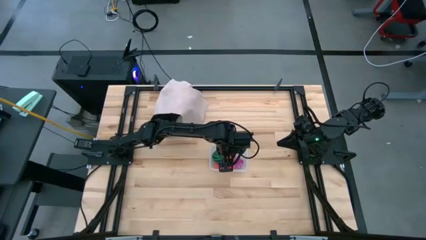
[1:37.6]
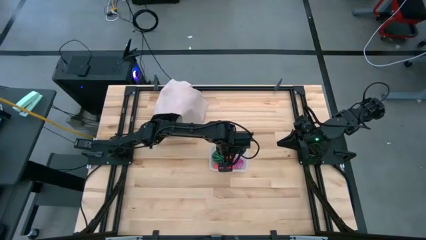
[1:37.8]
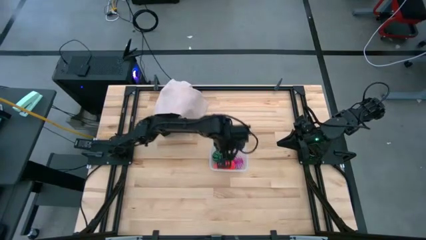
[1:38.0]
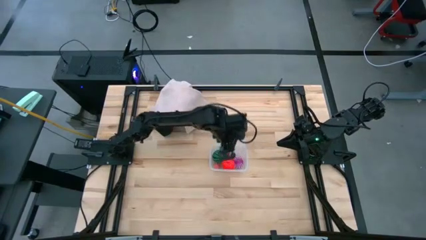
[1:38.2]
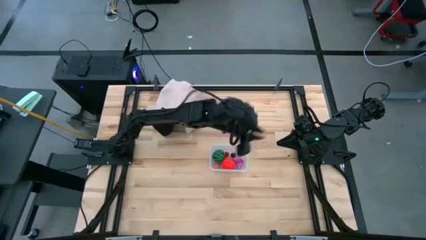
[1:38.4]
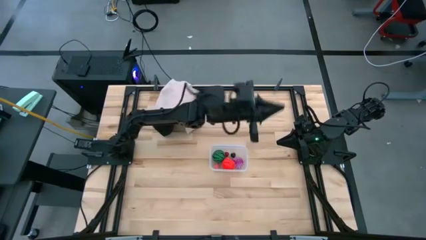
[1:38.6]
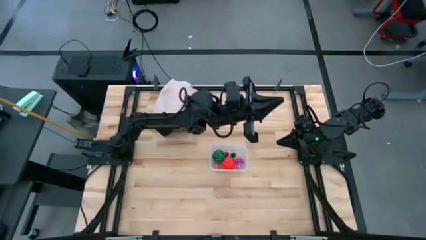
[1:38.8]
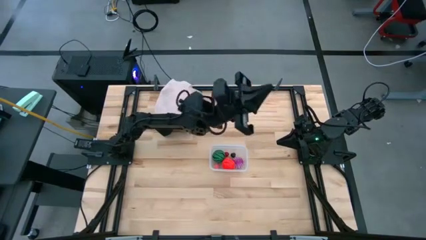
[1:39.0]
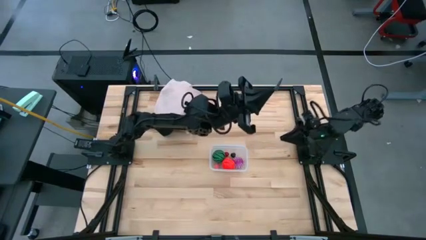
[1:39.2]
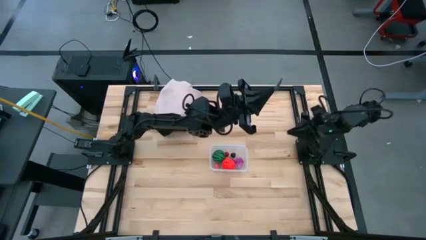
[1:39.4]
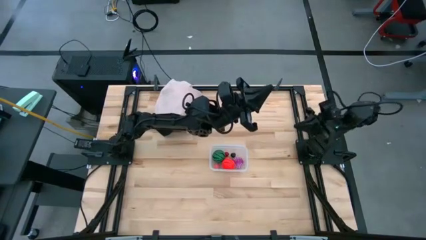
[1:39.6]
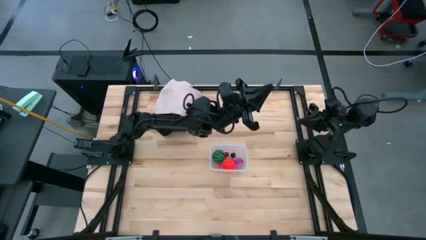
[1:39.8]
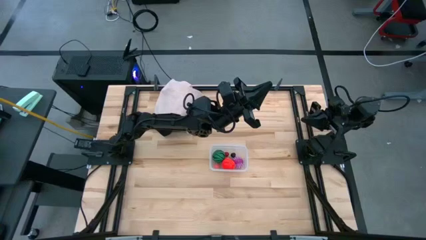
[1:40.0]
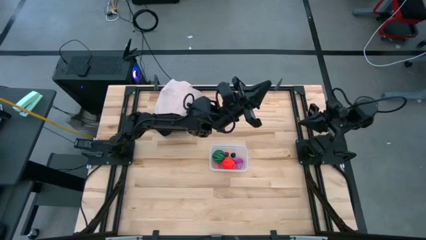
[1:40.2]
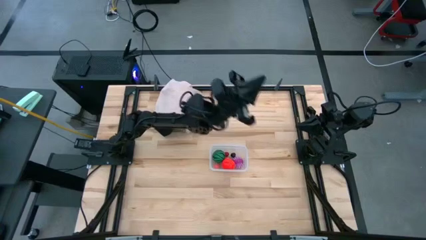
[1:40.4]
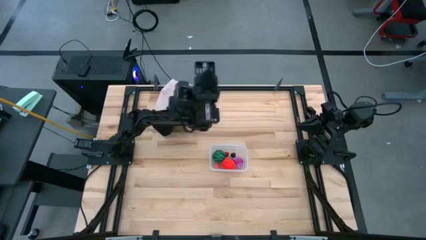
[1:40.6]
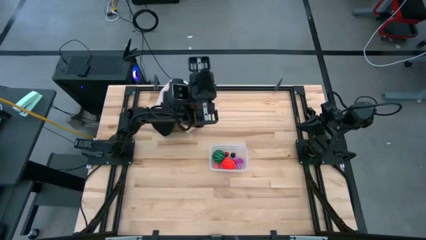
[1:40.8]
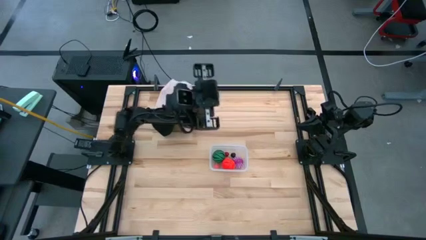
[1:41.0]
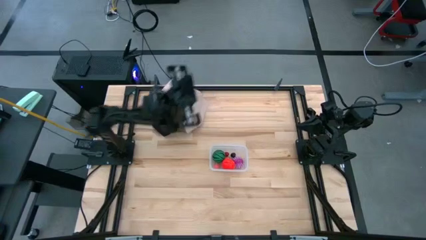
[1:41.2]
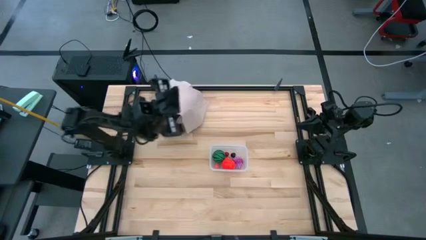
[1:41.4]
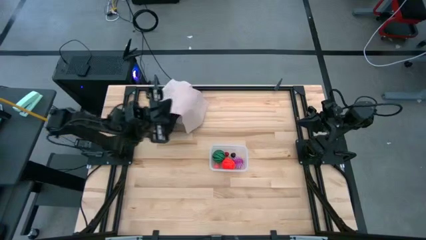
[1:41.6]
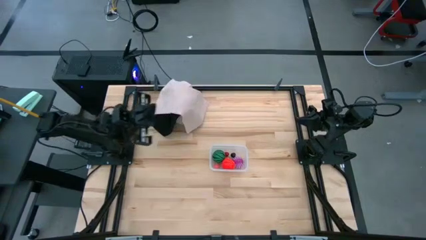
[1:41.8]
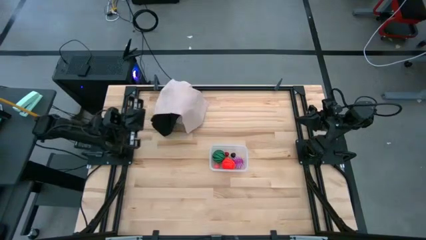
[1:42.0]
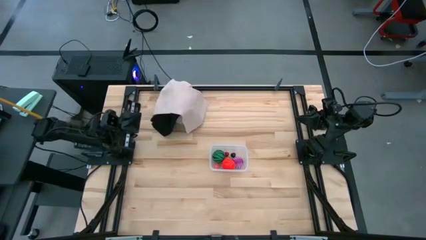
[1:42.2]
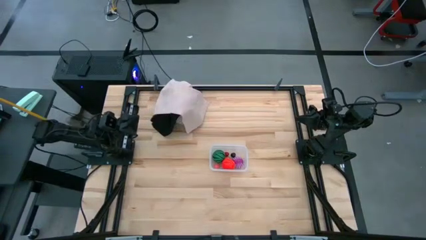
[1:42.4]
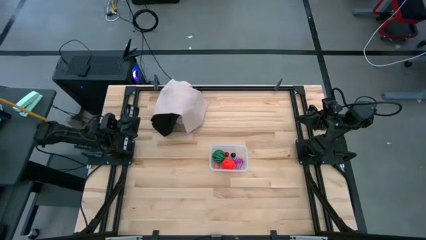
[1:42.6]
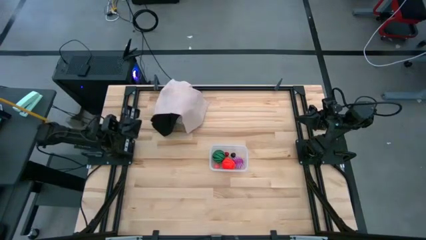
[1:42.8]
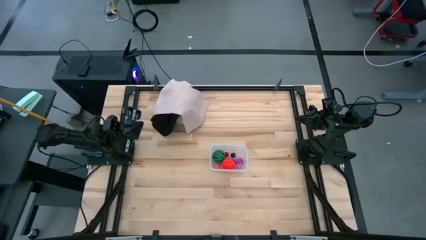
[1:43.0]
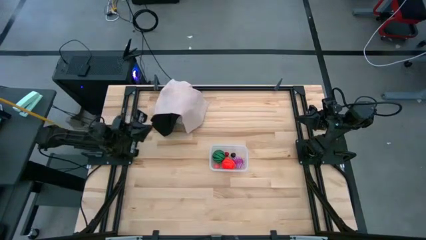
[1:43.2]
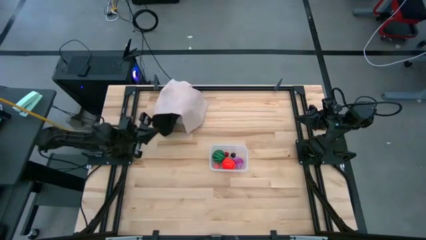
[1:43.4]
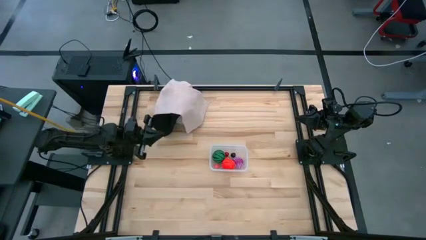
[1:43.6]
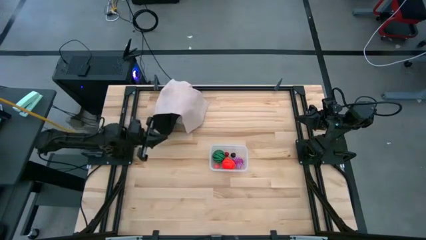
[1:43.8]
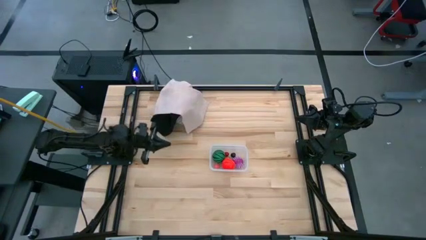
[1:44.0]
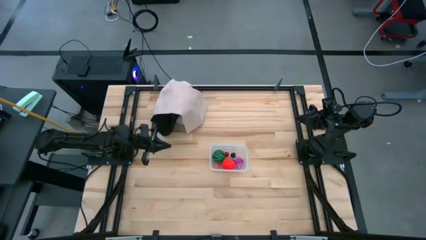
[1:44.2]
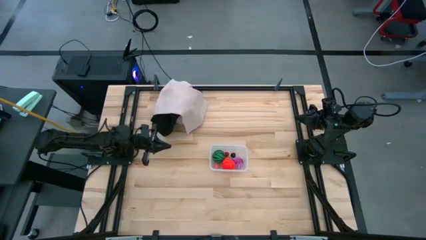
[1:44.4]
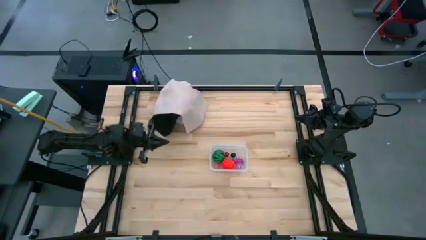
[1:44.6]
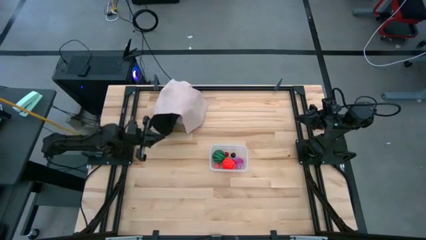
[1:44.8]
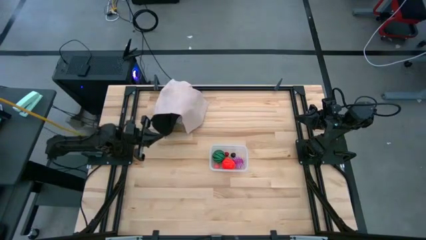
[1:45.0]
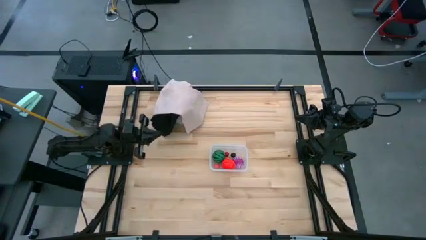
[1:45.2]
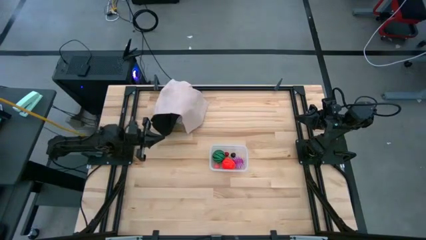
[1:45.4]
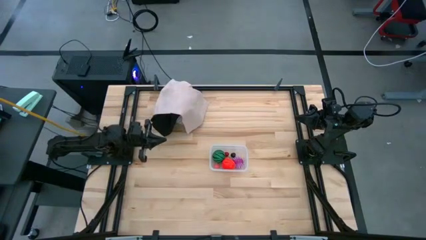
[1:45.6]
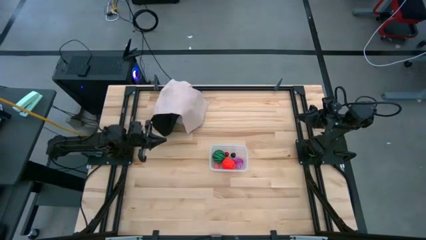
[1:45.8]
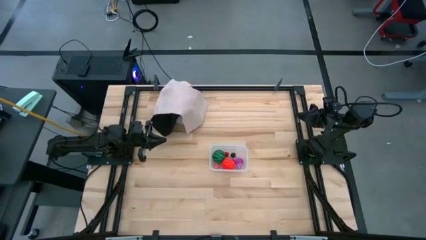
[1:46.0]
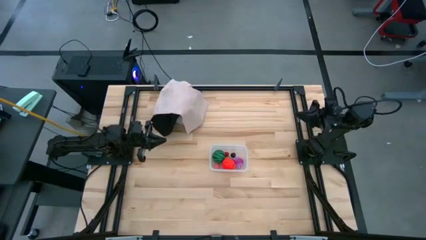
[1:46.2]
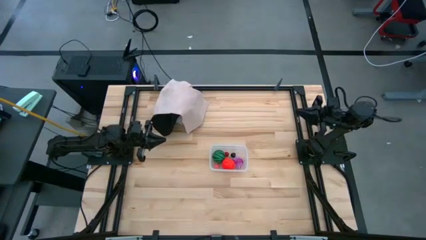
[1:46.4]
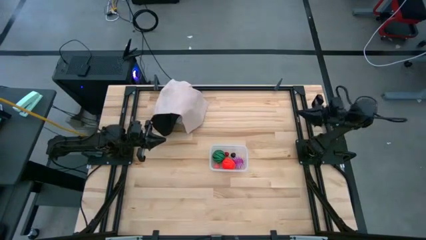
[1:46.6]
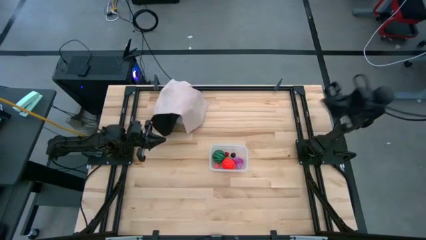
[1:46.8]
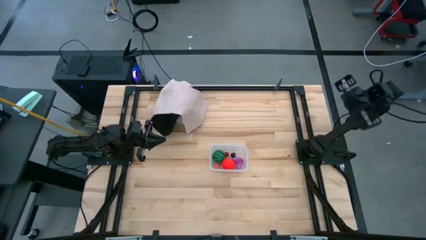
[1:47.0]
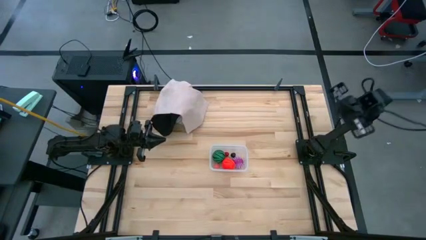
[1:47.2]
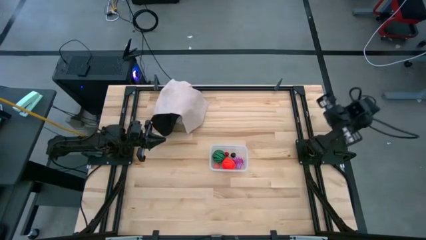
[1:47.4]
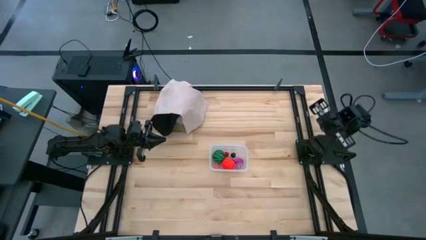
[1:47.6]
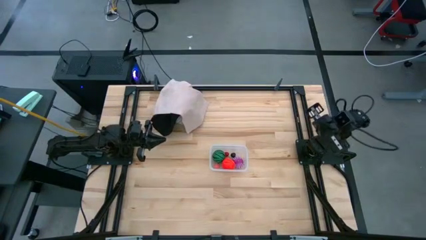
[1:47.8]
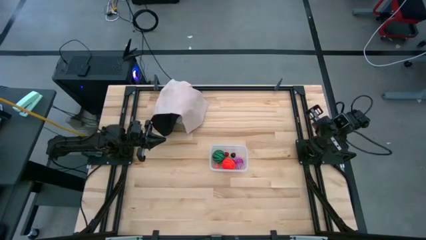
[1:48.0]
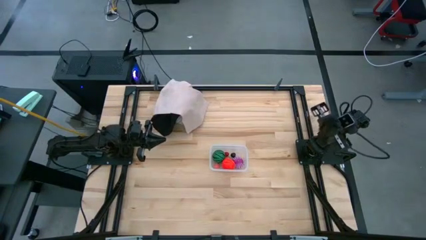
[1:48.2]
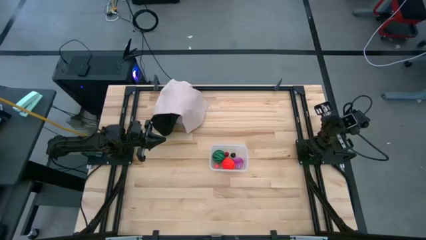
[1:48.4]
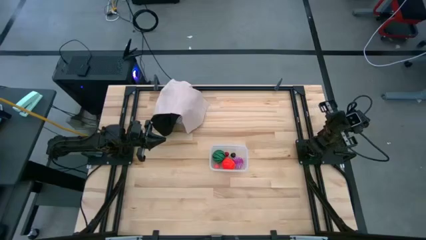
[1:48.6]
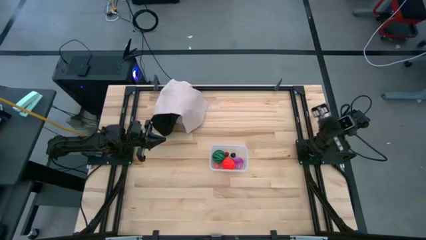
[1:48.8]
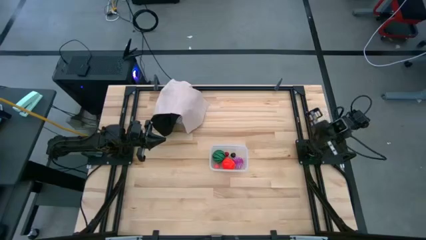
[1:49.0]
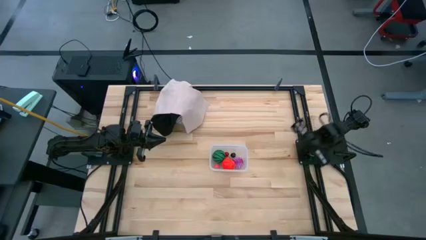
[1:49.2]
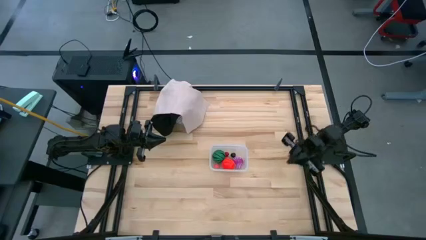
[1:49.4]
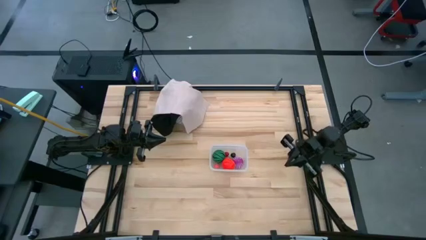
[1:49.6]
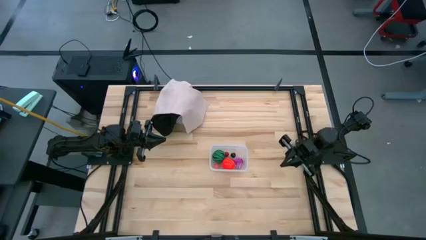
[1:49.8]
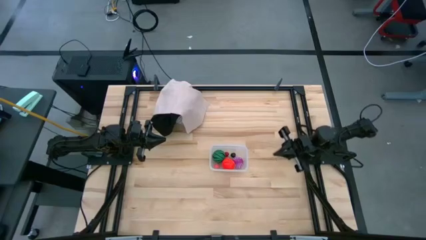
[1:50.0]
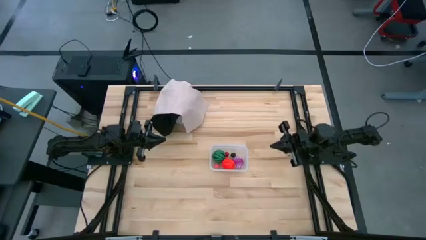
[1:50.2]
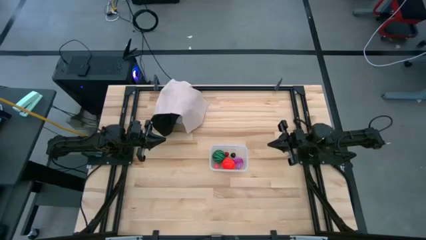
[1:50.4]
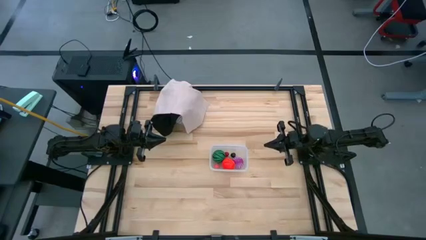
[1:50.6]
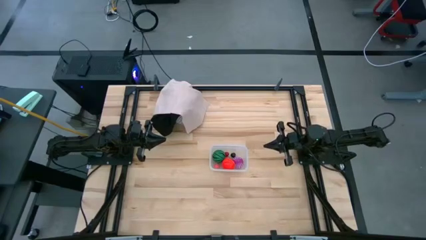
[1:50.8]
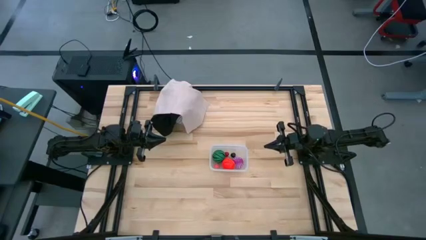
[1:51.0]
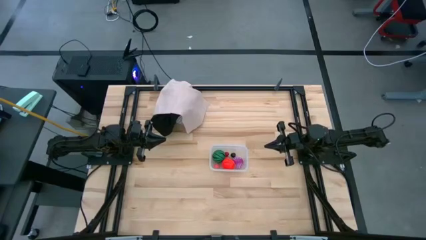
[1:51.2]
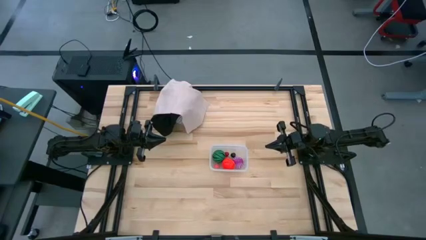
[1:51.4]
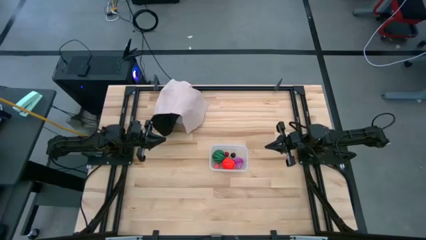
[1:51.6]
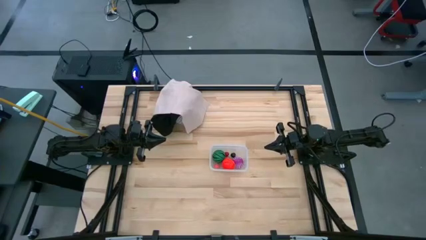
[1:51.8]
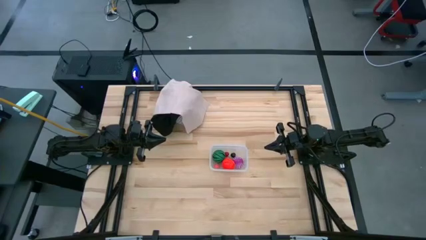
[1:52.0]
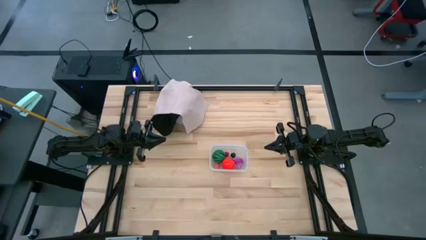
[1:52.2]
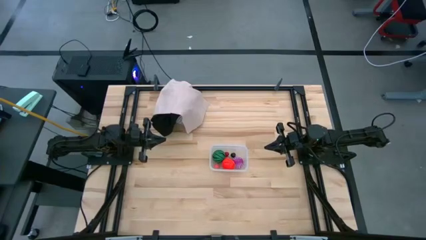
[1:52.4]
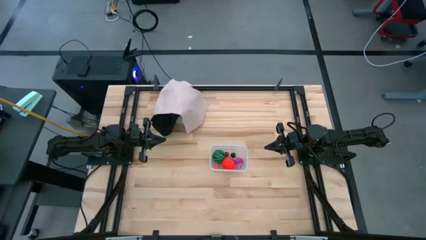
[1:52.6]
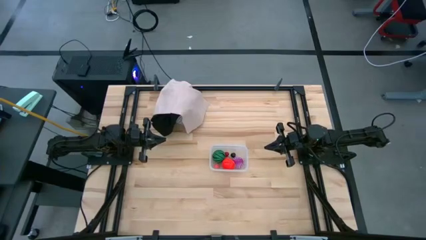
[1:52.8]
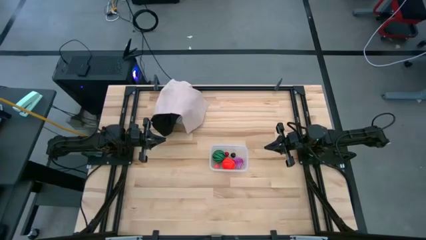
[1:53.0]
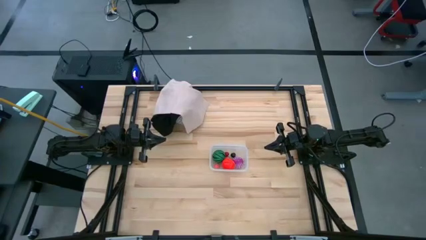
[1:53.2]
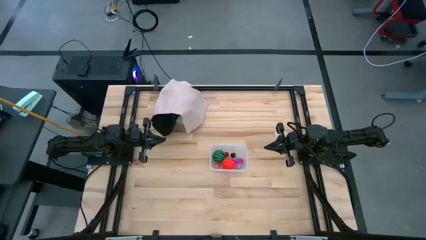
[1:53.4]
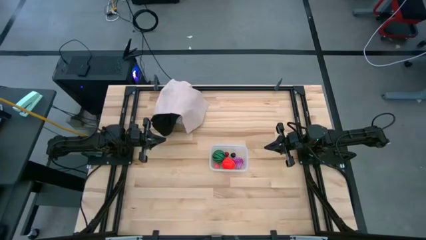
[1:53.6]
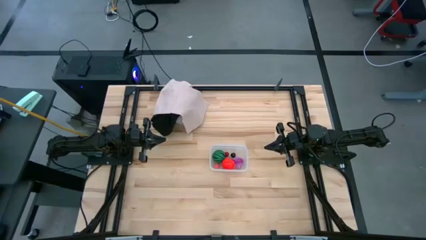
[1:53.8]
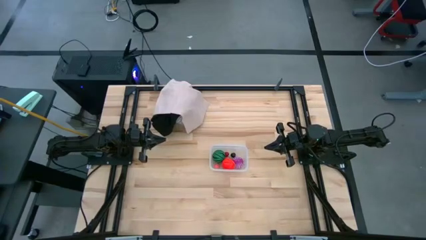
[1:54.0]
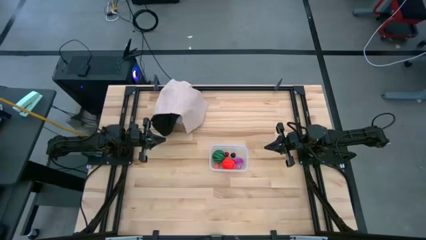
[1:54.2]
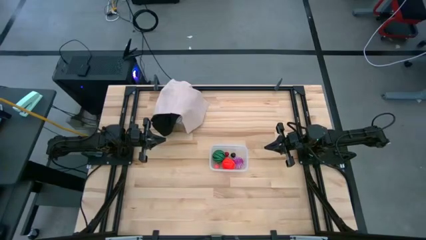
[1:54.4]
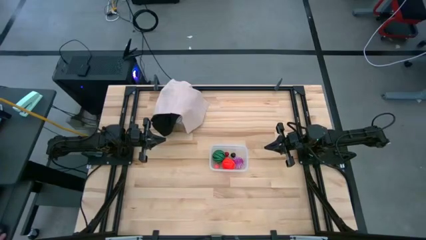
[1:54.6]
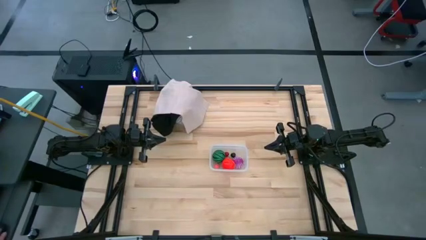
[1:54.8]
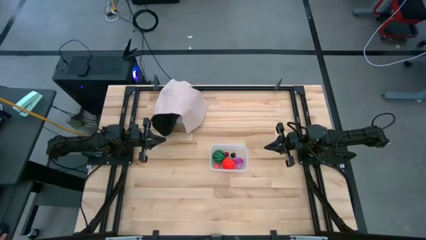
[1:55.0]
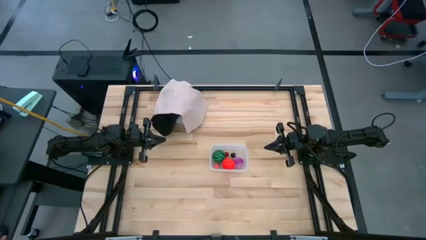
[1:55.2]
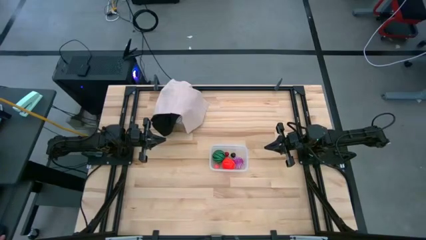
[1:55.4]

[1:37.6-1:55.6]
Task: Pick and placing Produce into tupperware
Return to Home Position
